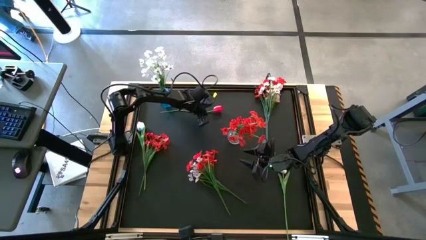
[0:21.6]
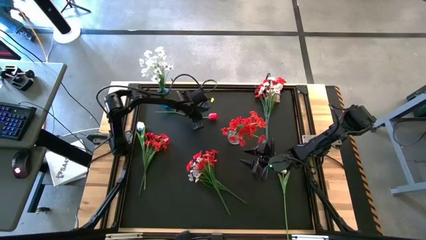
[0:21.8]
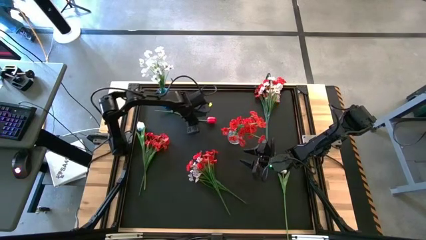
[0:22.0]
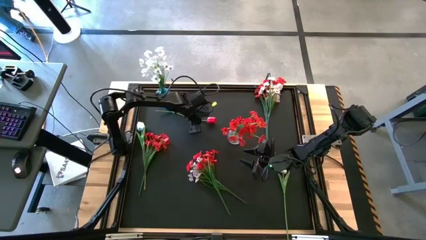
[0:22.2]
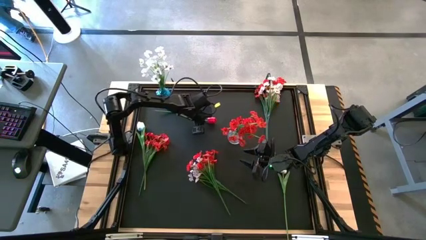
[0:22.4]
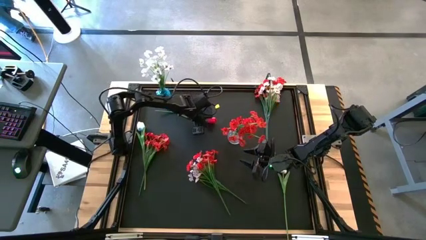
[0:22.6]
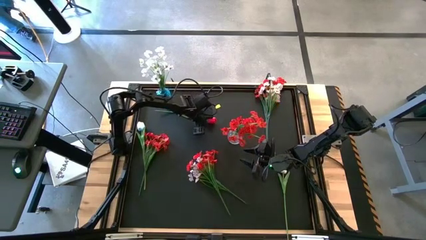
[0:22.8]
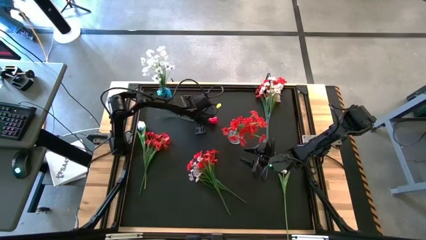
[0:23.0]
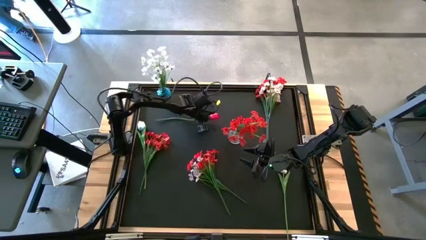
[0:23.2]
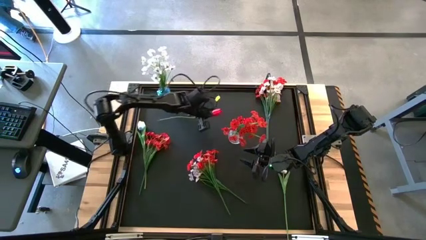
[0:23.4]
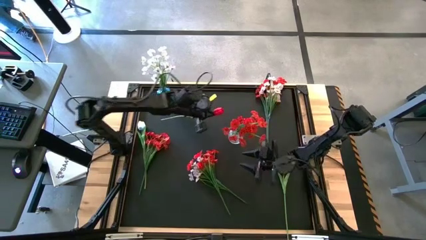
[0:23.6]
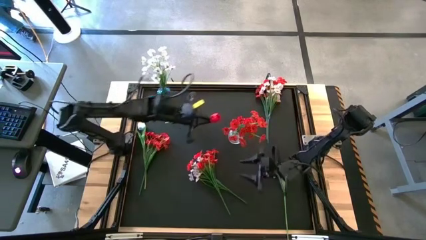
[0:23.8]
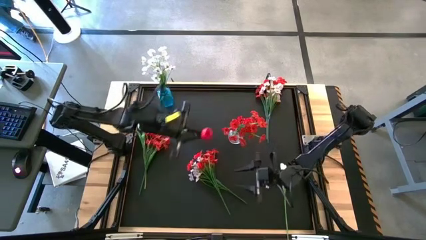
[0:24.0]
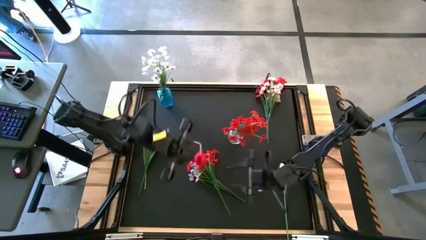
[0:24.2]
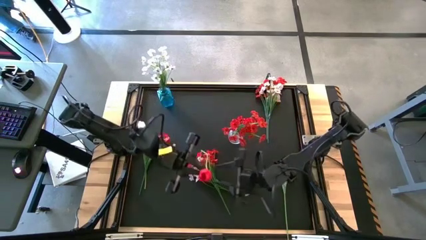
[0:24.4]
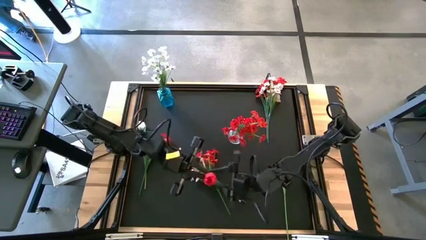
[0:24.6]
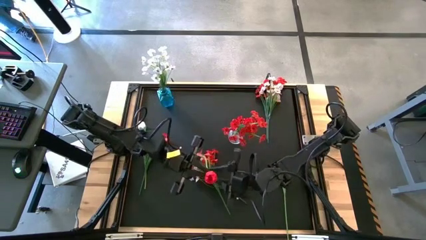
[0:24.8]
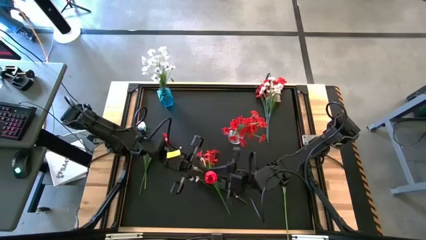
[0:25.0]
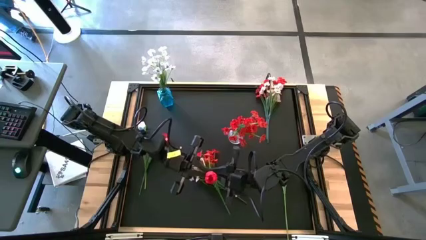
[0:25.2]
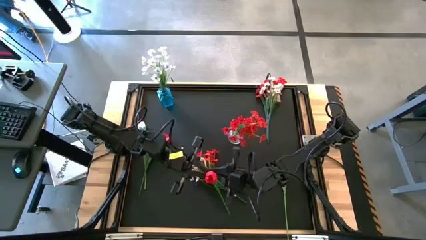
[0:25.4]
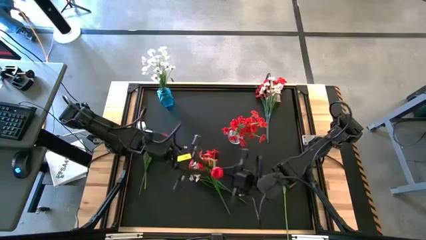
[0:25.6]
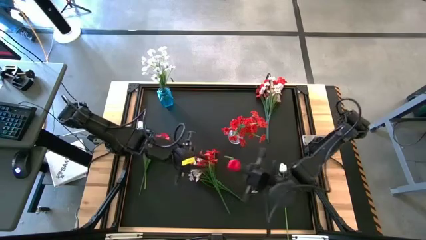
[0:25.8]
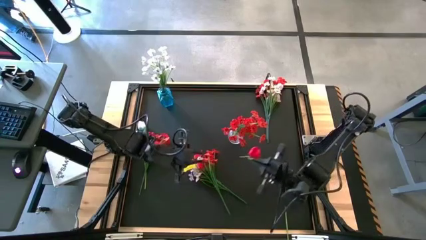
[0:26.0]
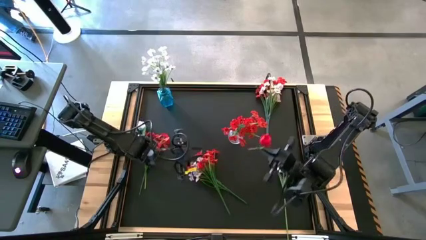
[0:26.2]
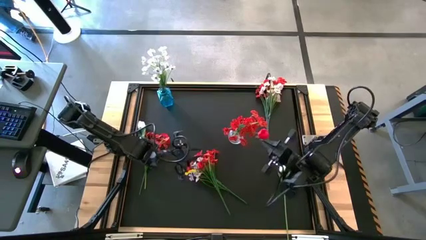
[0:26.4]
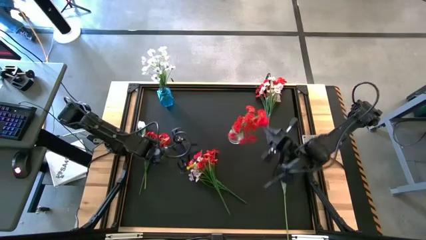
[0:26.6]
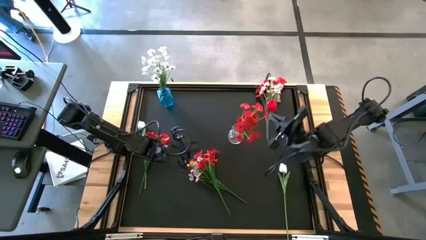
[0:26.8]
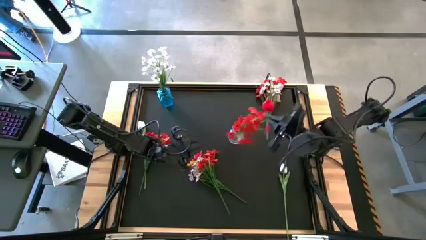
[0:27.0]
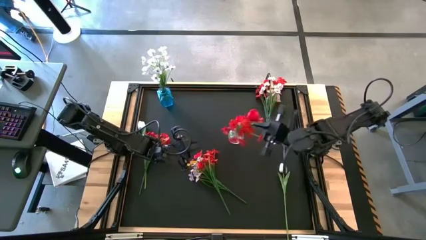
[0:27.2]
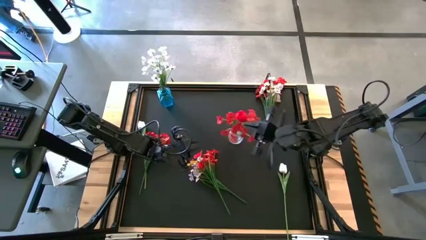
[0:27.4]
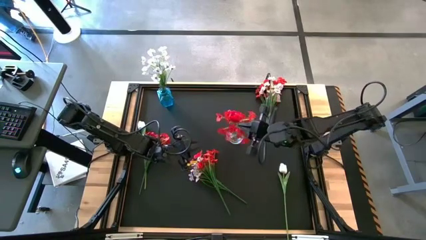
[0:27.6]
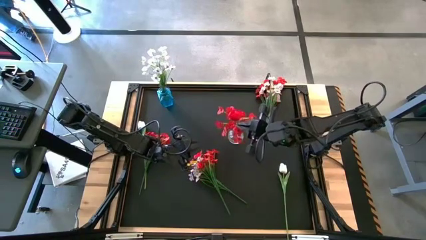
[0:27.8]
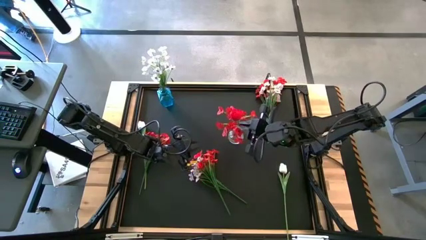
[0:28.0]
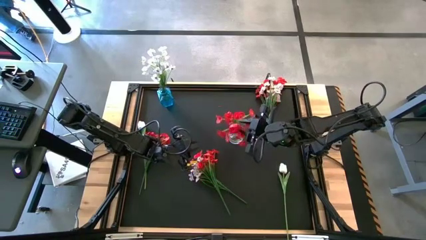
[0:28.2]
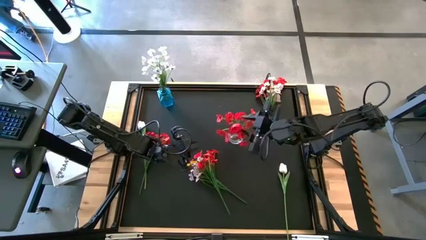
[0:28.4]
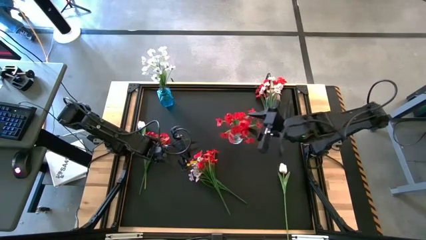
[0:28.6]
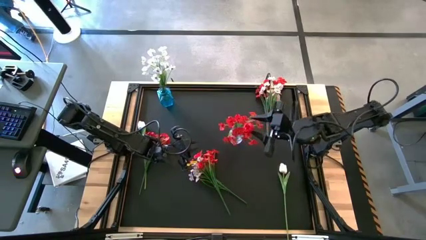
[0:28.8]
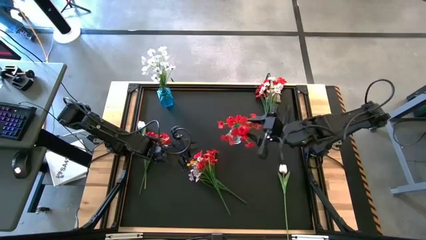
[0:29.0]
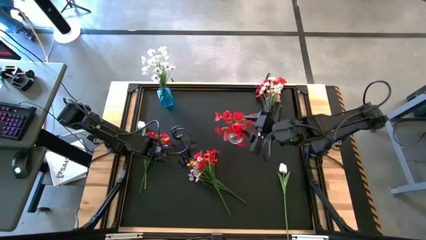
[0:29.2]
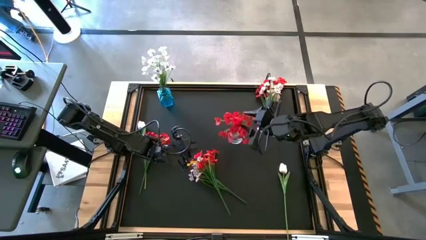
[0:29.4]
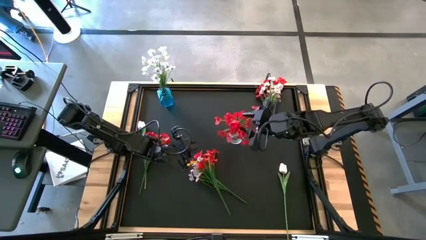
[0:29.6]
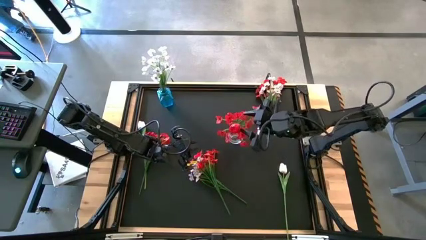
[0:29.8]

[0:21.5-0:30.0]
Task: Sort flowers into vase by color
Put the top left red flower into the transparent vase

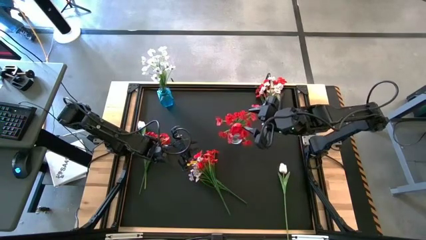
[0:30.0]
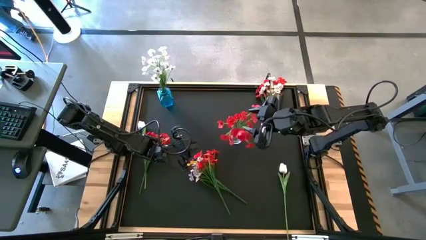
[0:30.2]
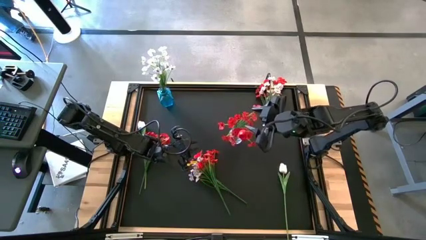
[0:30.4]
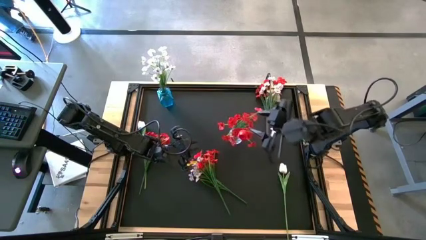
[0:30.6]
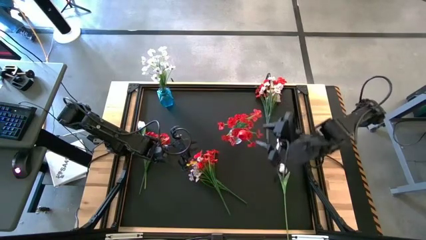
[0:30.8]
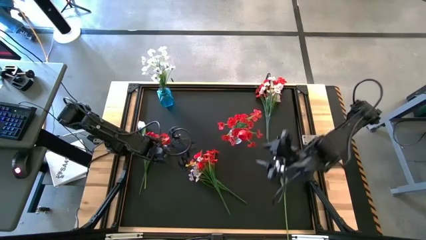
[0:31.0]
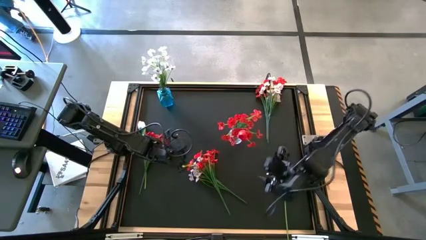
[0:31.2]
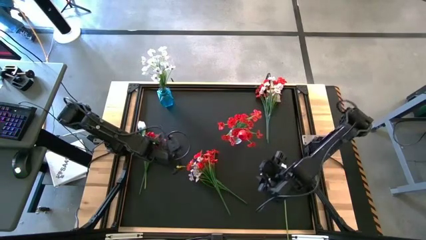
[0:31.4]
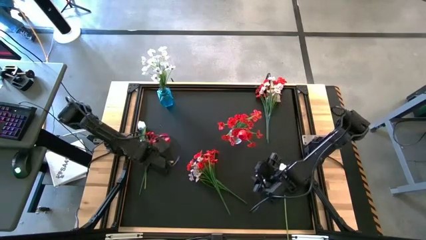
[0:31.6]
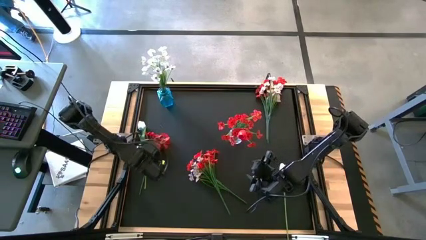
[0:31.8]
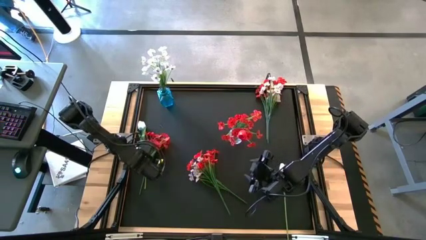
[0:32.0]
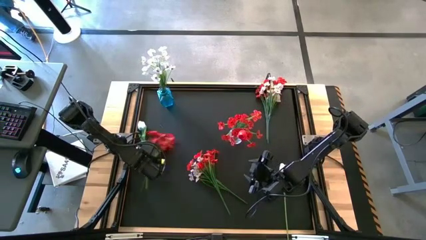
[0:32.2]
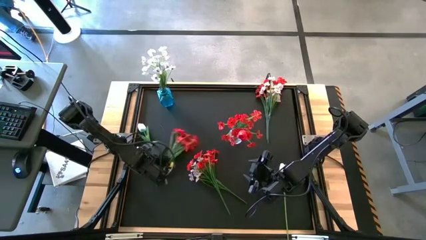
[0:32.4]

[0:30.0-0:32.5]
Adjust the red flowers

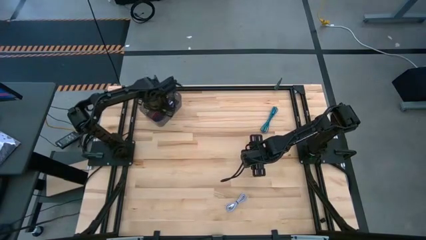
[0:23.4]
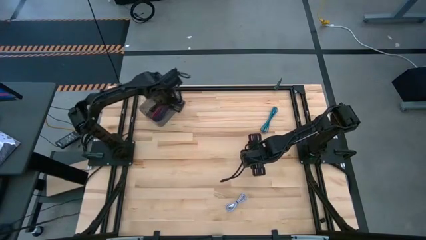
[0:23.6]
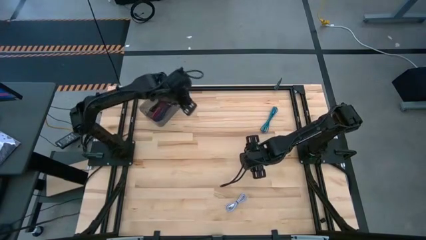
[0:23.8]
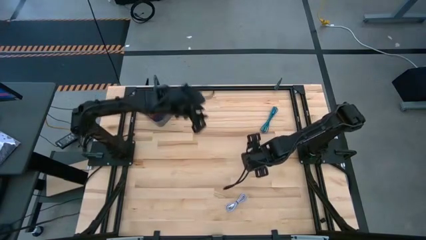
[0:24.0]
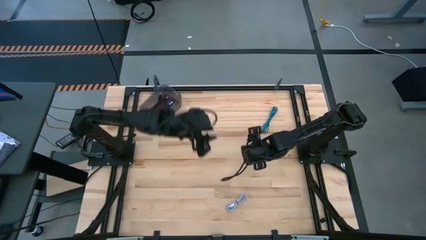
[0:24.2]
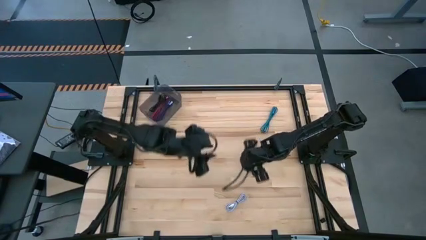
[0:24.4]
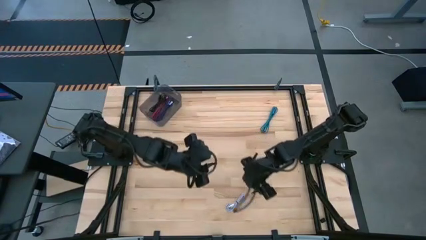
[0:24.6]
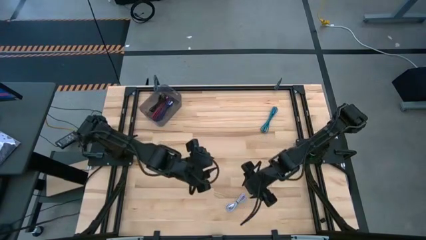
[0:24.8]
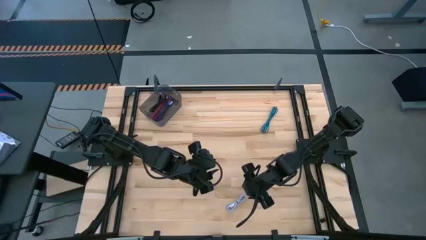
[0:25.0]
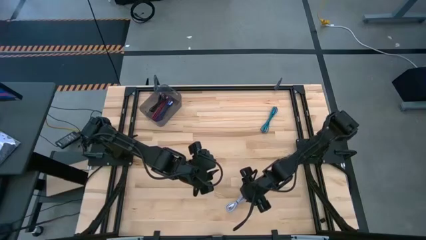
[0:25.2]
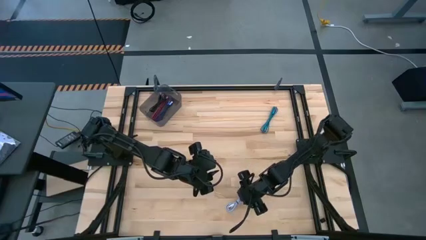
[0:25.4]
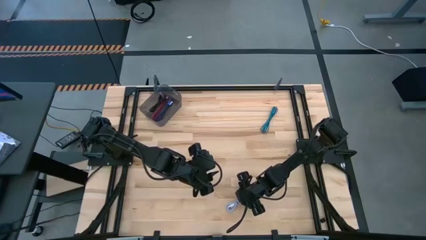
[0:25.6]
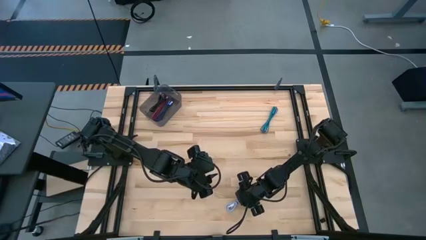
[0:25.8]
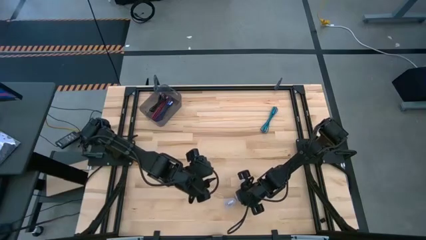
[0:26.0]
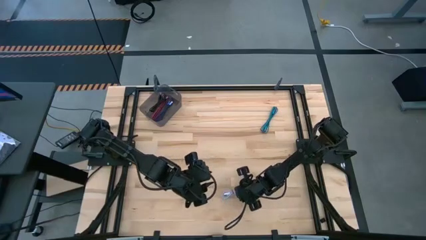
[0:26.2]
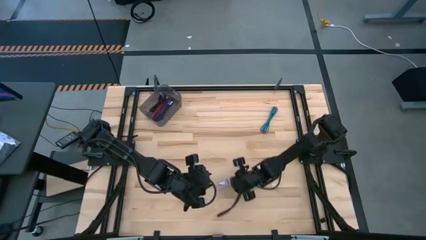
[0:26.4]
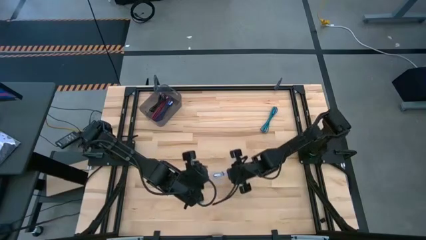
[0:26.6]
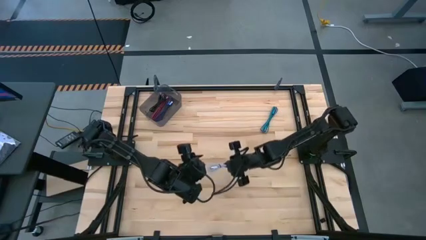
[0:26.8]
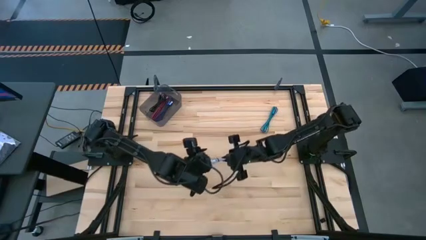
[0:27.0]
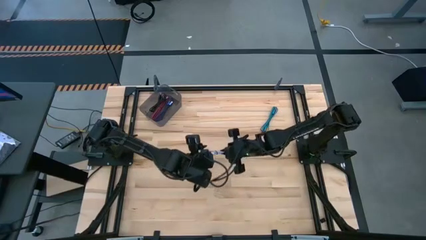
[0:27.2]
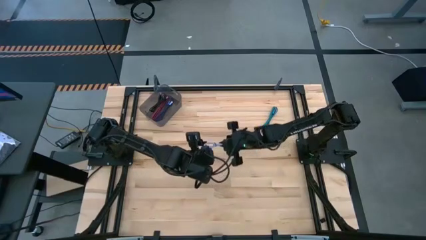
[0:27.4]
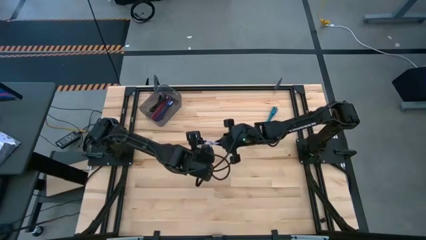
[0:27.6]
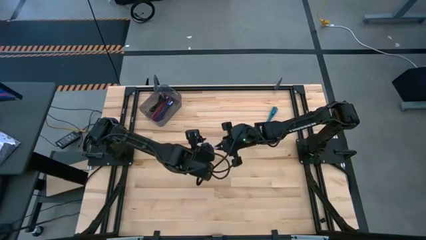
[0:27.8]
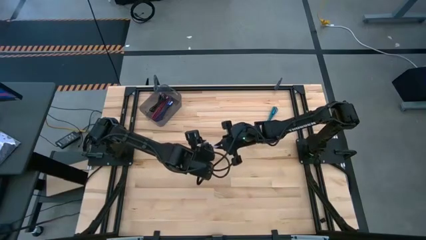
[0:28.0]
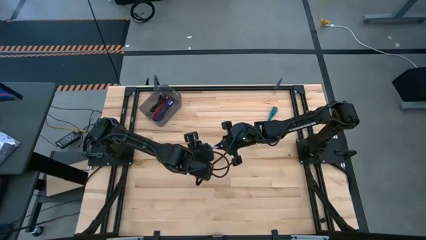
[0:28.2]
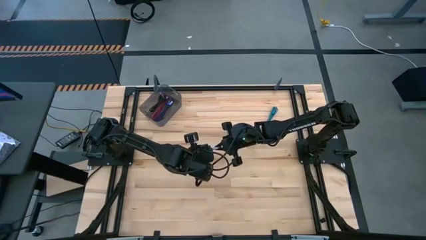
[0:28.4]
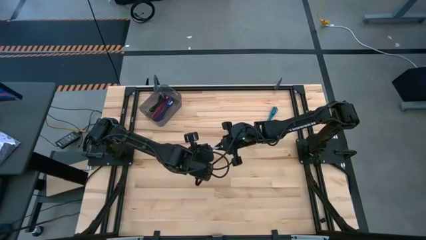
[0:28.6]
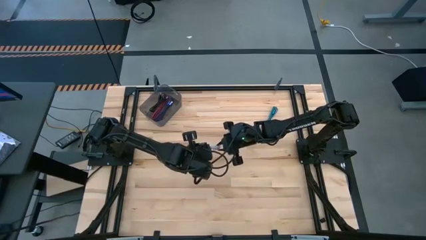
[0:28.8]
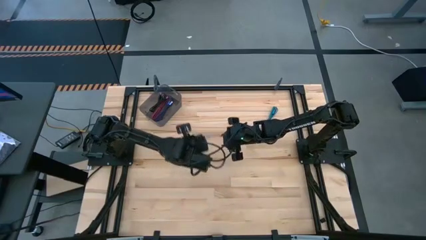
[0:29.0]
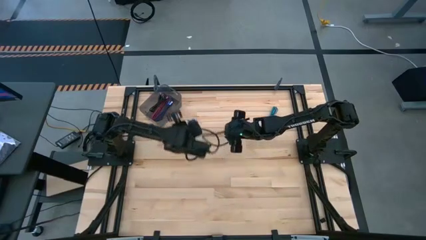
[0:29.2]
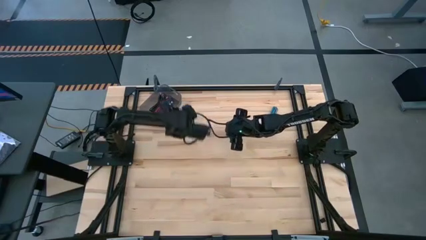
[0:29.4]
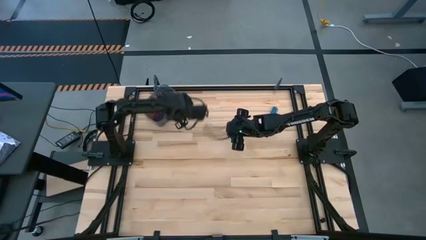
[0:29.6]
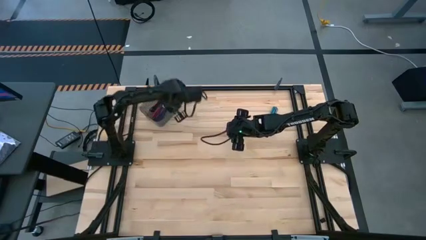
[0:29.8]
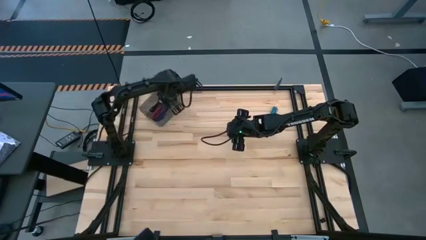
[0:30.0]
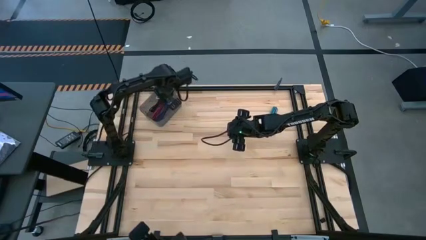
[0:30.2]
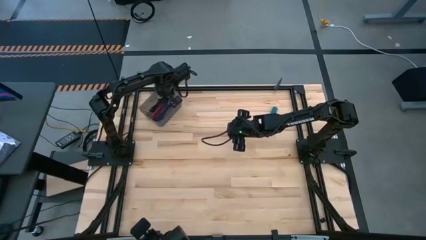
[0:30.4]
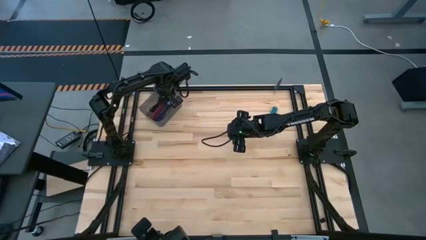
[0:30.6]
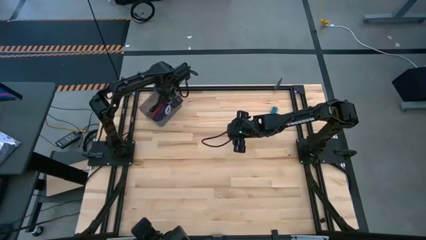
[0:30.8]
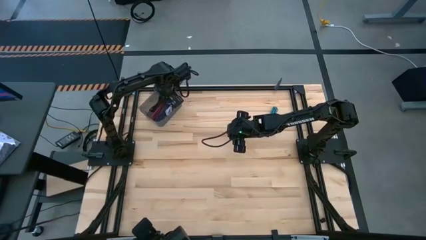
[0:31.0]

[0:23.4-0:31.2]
Task: Pick and place USB-C Cables
Put the white USB cable into the black bin
